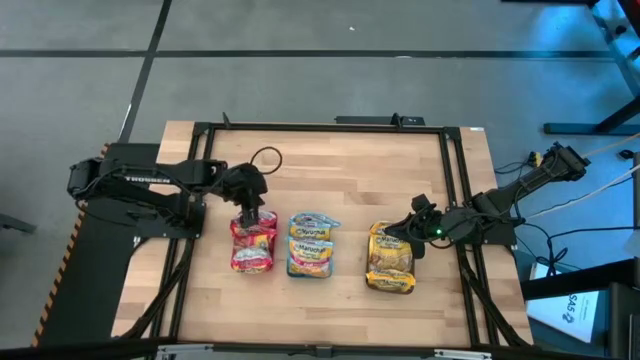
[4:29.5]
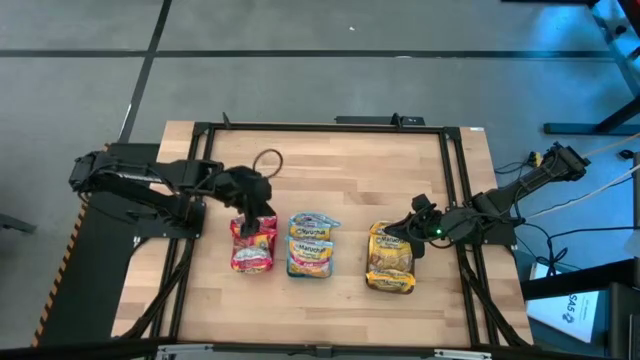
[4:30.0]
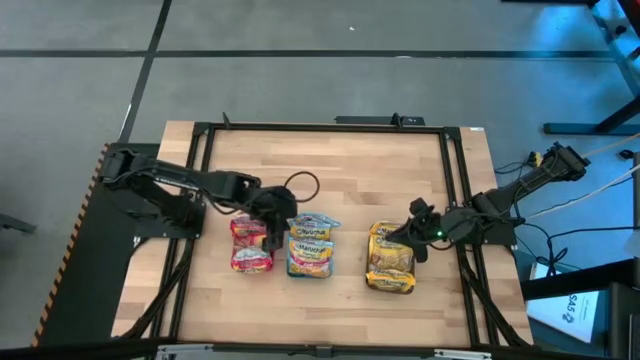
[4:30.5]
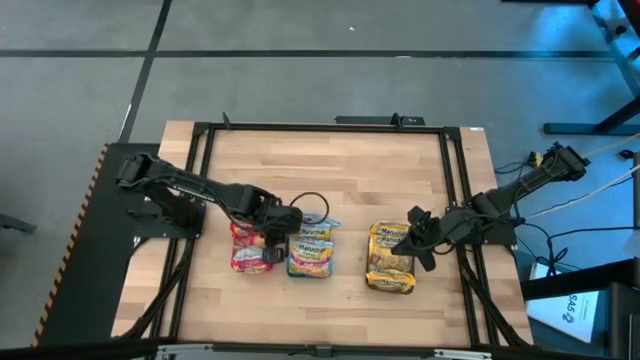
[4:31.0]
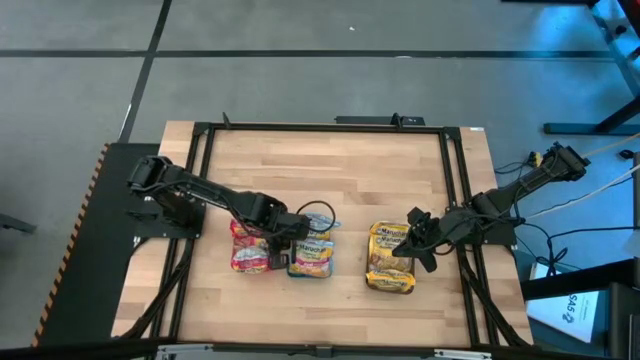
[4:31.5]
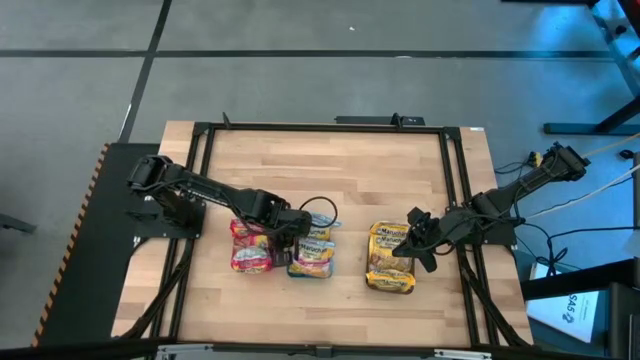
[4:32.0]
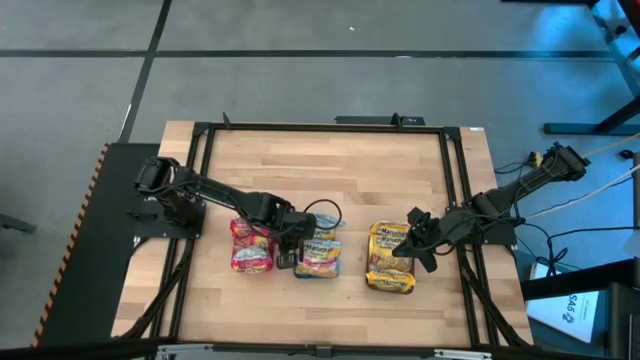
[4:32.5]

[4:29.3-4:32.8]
Task: Sort Maruchan noodles
Adjust the blue bin

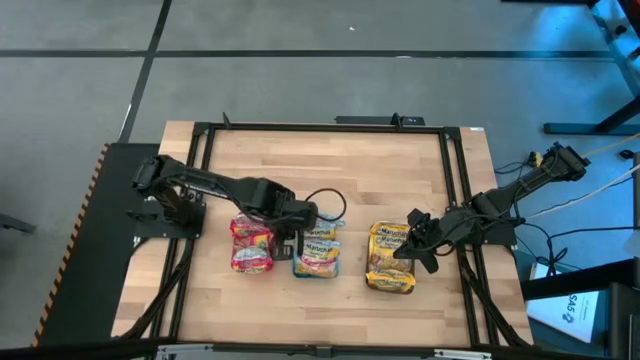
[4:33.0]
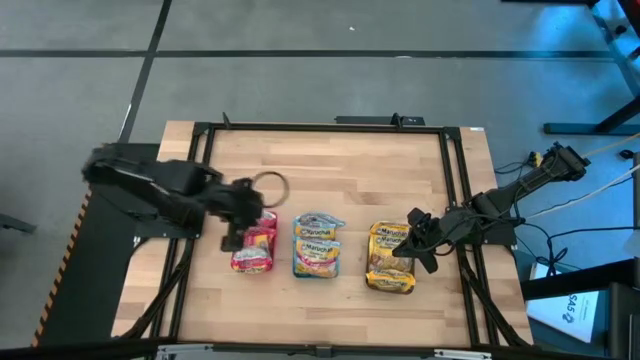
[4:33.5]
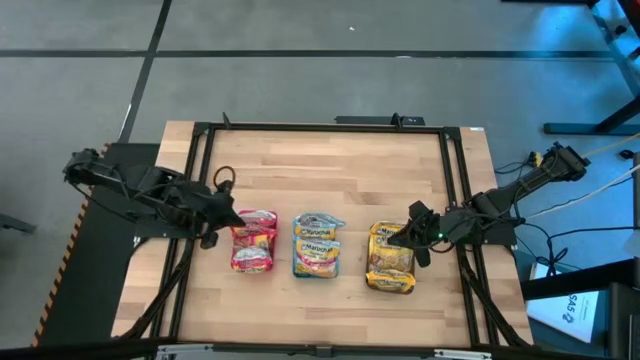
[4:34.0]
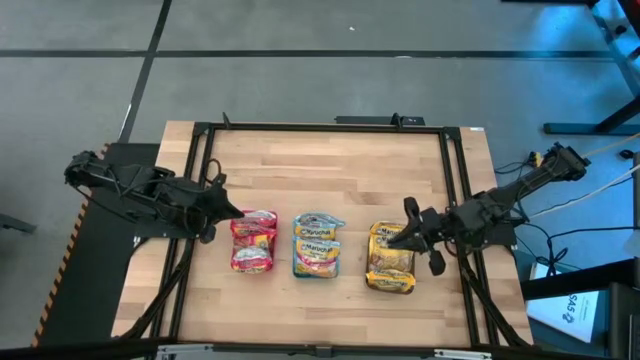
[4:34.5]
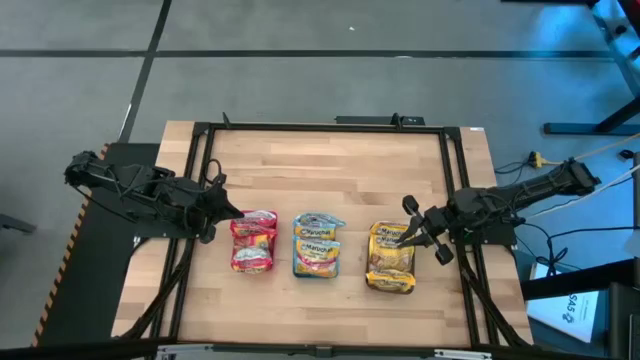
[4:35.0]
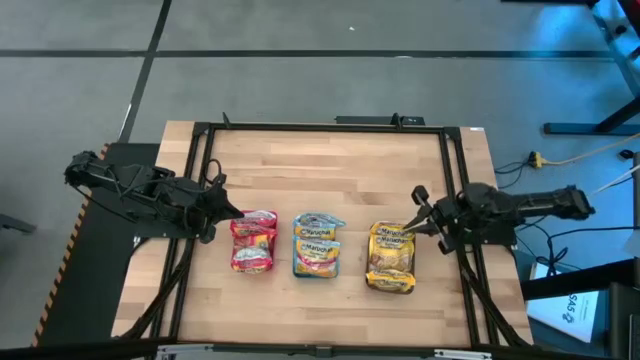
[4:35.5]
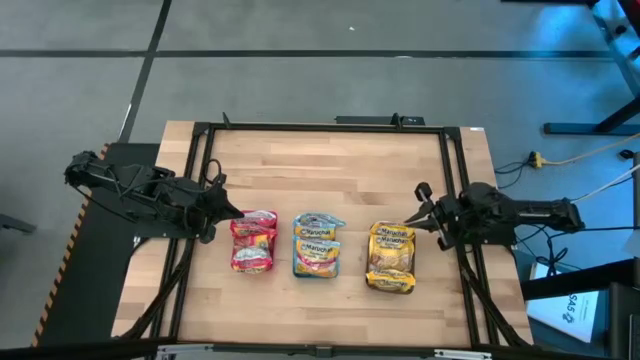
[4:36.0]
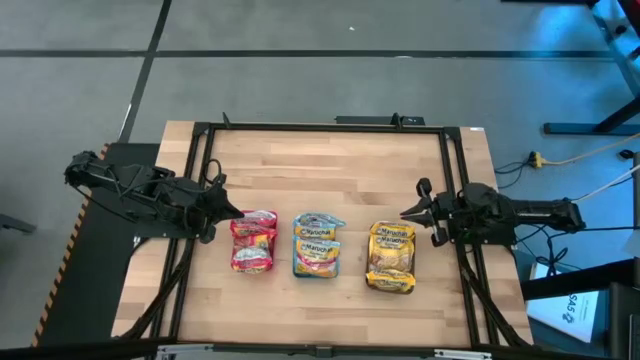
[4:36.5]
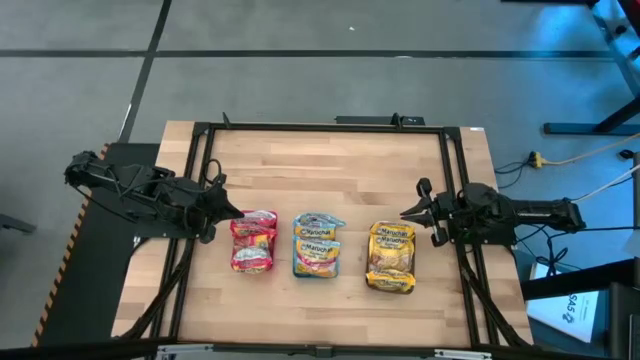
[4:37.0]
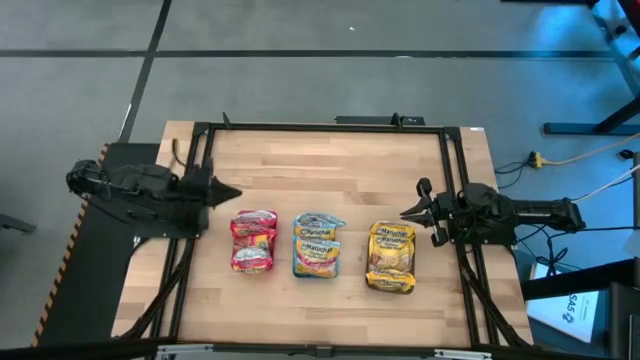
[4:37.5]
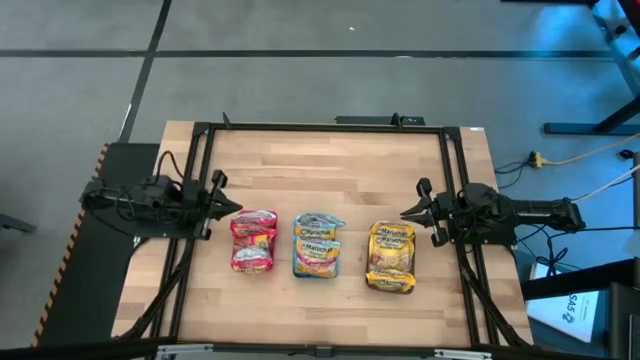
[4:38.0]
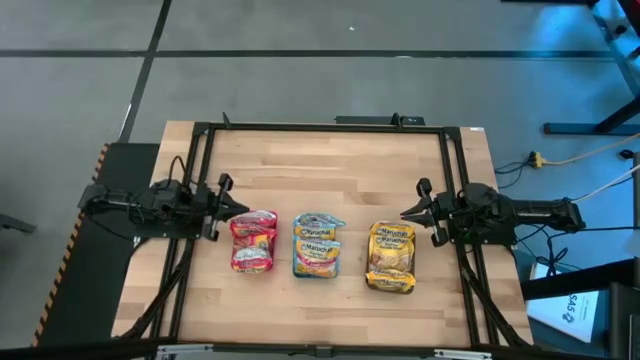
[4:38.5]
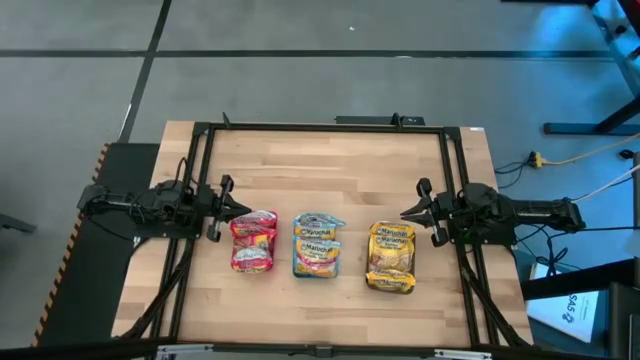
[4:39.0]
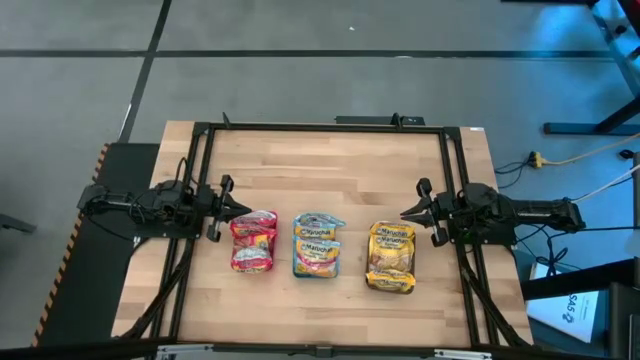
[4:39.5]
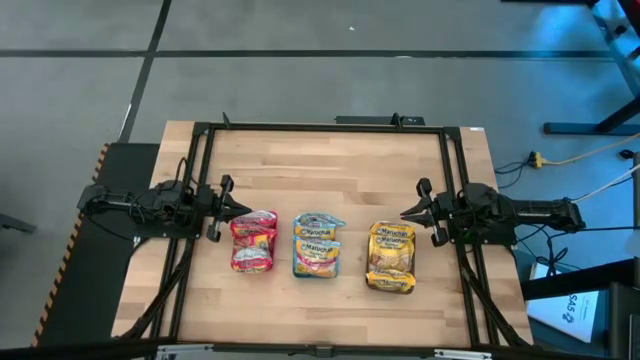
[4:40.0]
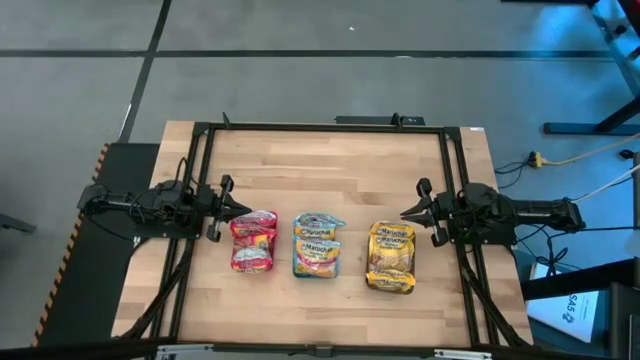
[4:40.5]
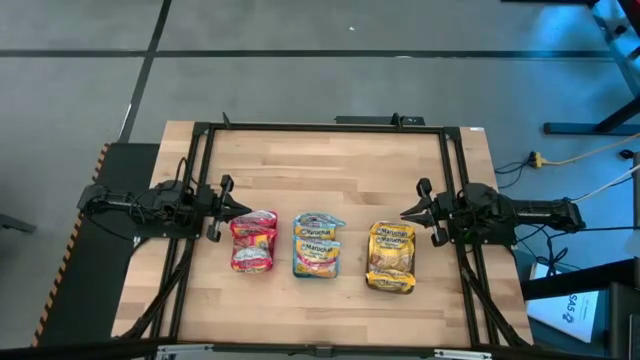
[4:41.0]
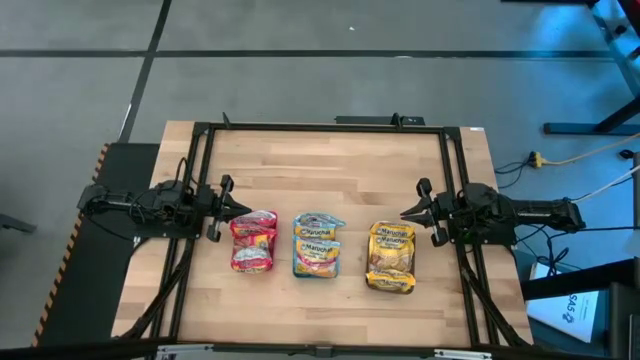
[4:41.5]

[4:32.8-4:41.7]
Return to Home Position

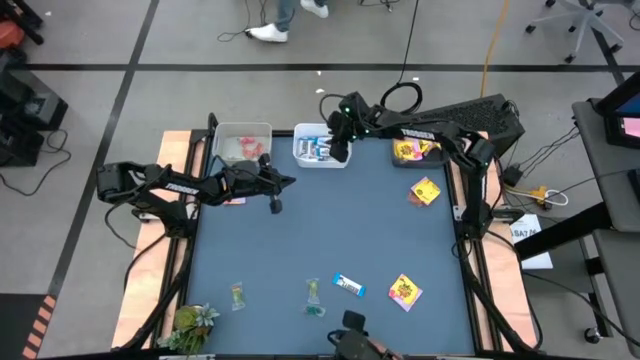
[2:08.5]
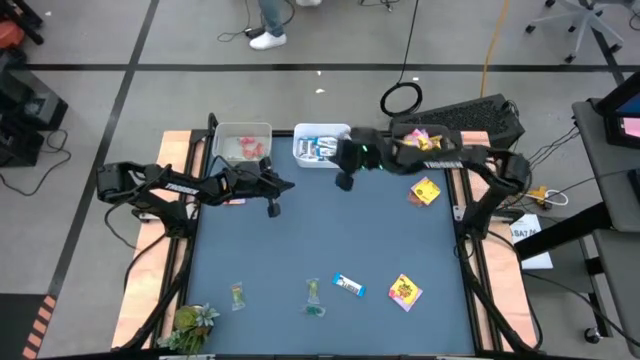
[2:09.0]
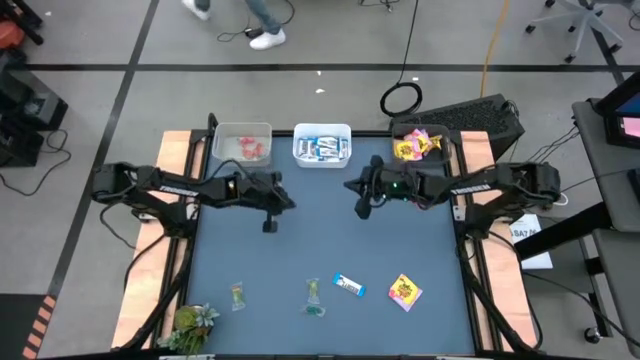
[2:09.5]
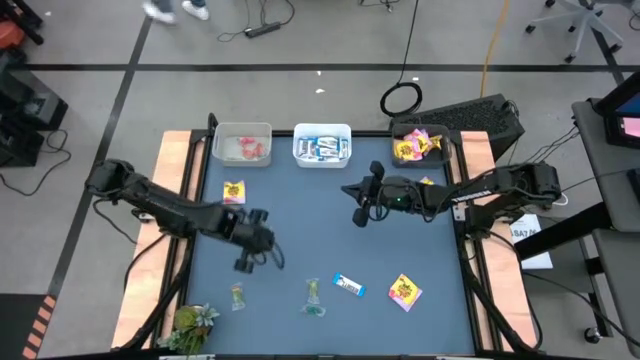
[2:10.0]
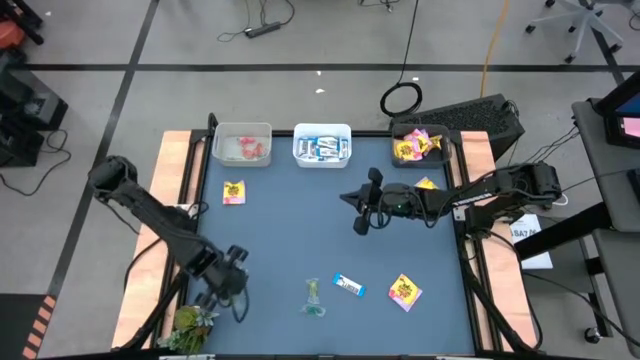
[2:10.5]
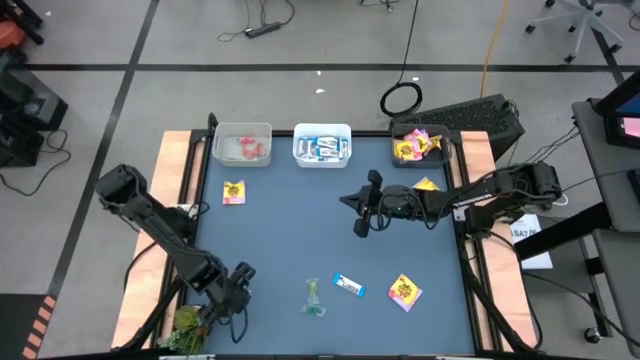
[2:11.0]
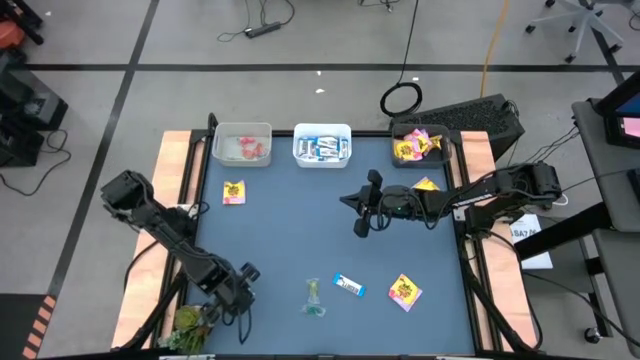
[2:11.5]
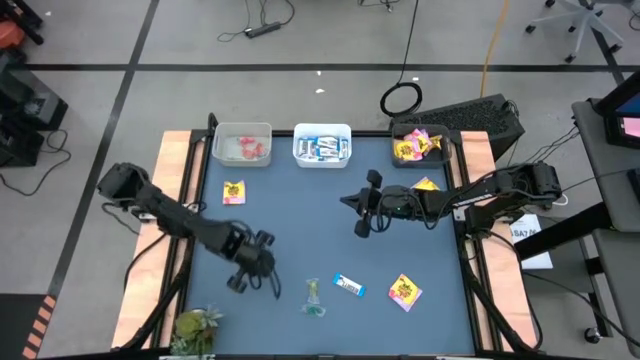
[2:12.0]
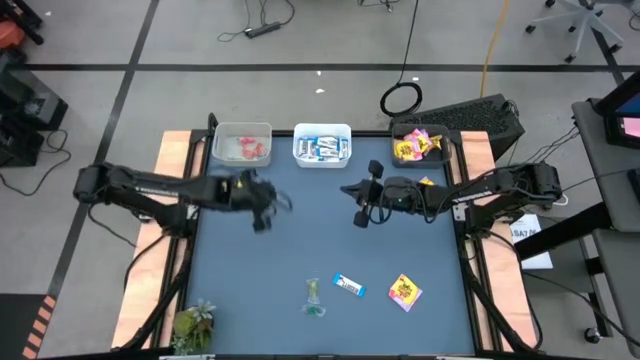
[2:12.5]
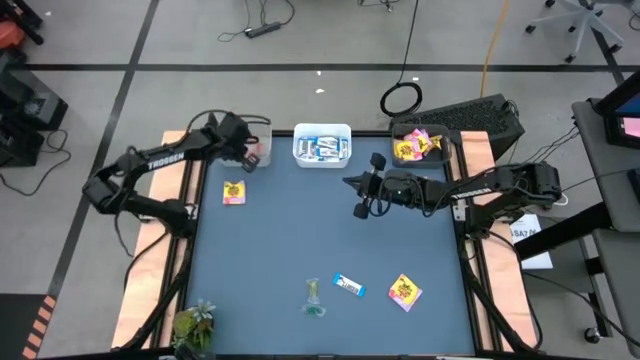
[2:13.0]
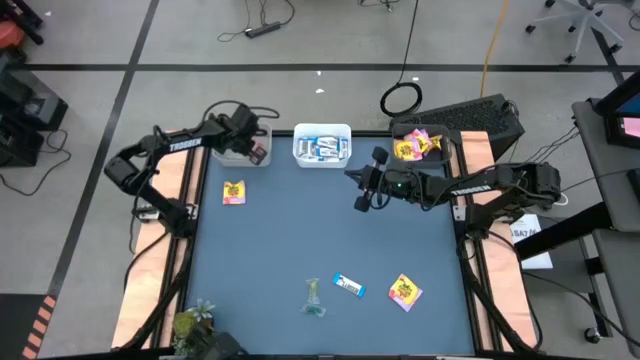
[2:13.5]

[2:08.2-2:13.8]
Task: Sort candy
Put the green gummy into the gray bin

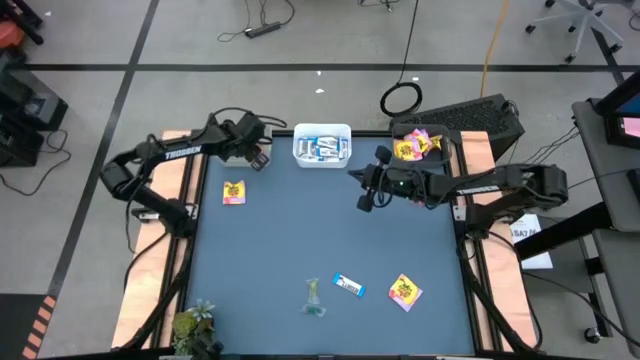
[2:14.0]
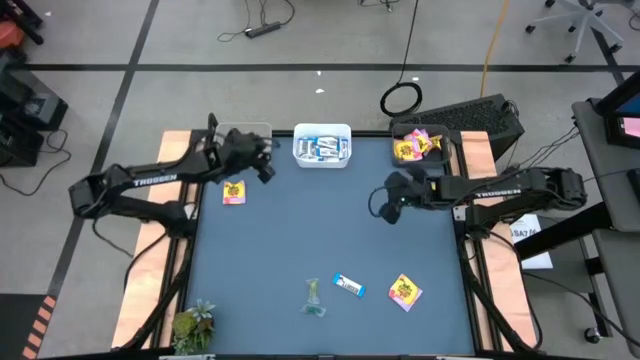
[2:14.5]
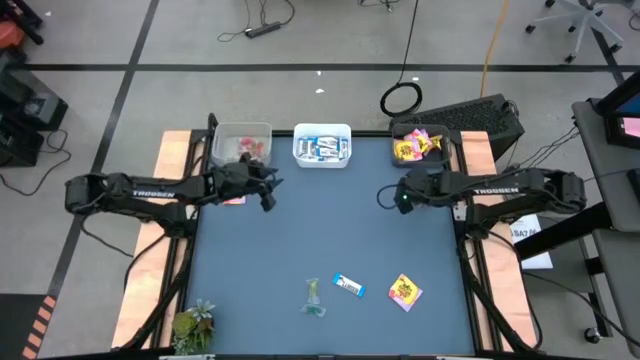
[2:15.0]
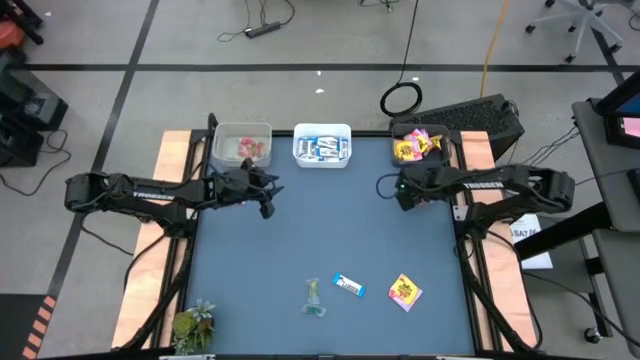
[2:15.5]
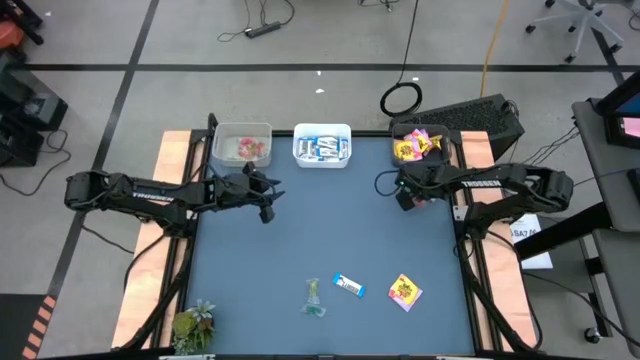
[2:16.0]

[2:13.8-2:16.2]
Put the yellow candy into the black bin
